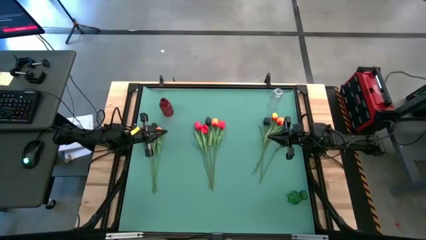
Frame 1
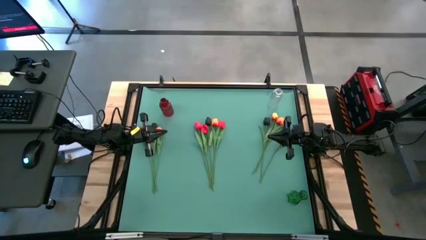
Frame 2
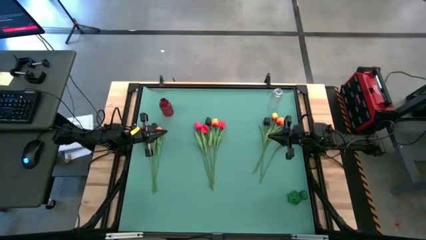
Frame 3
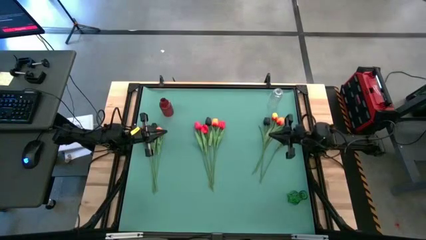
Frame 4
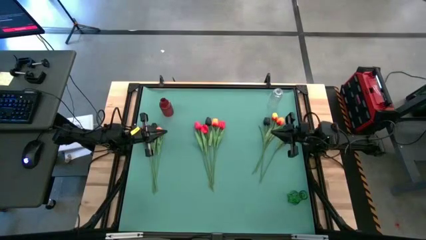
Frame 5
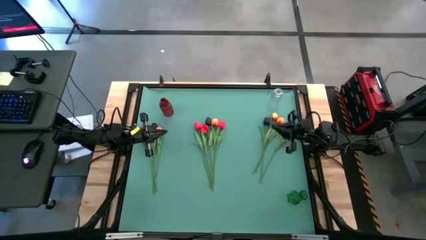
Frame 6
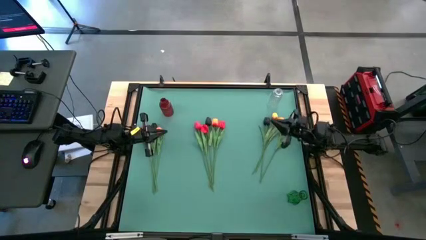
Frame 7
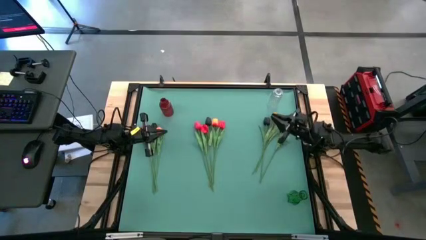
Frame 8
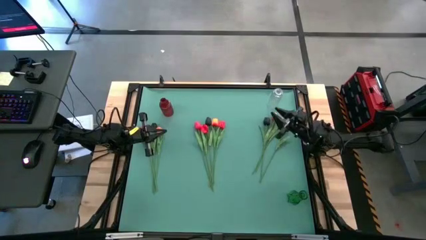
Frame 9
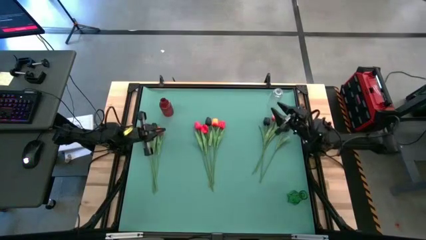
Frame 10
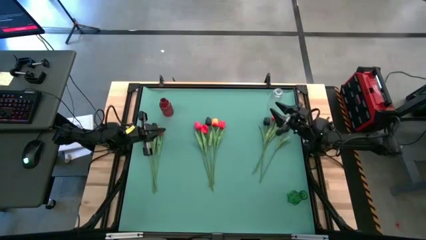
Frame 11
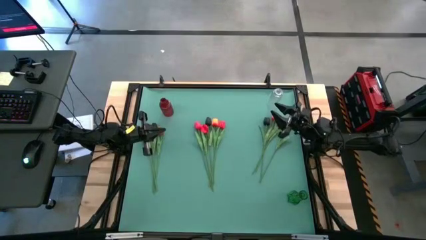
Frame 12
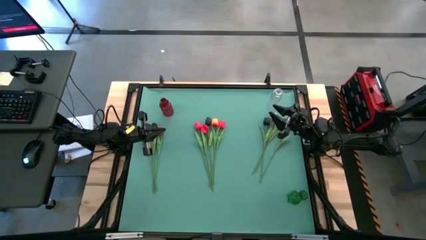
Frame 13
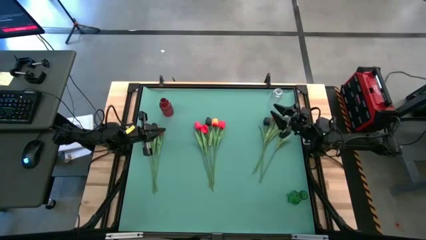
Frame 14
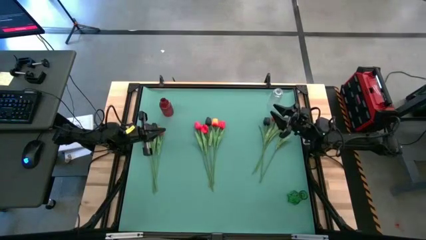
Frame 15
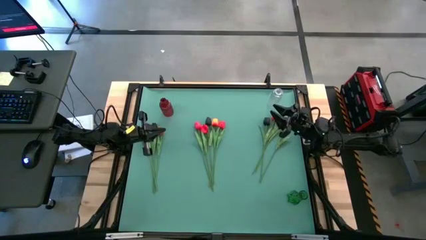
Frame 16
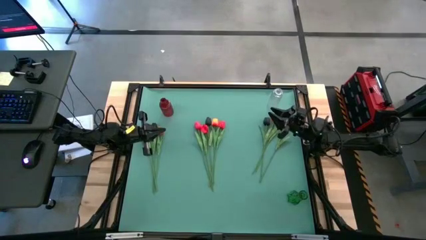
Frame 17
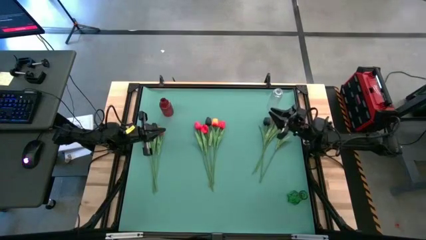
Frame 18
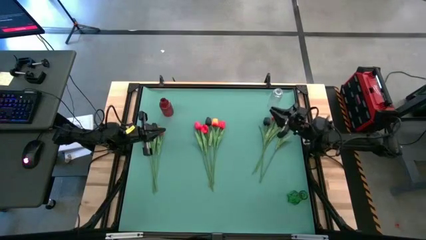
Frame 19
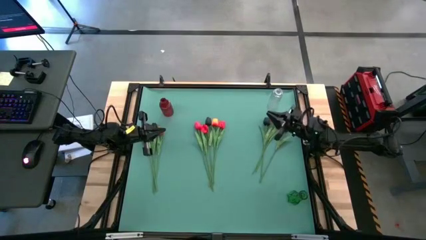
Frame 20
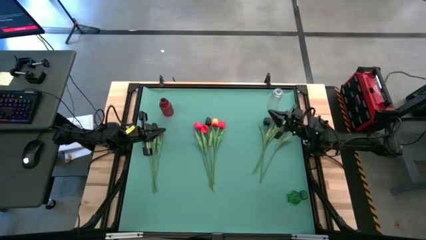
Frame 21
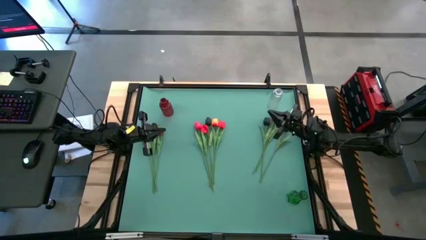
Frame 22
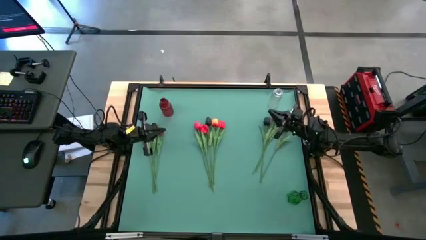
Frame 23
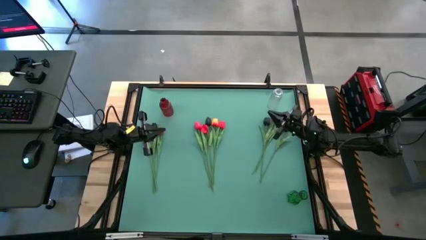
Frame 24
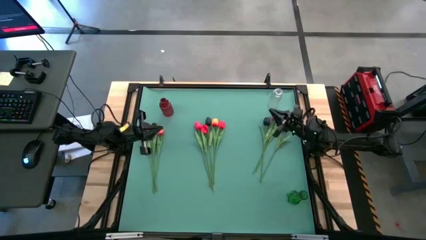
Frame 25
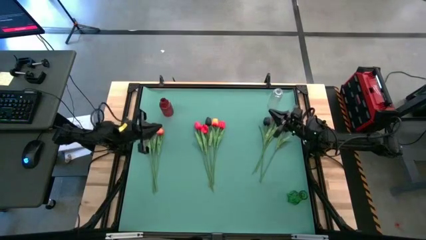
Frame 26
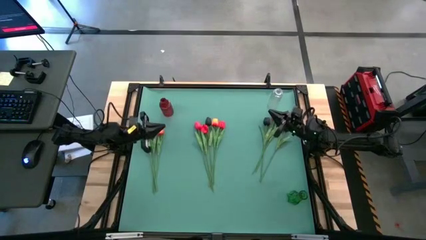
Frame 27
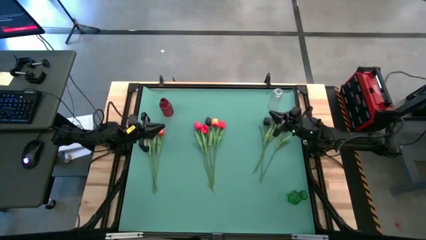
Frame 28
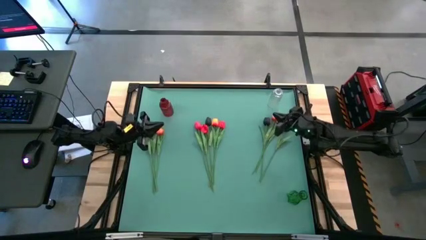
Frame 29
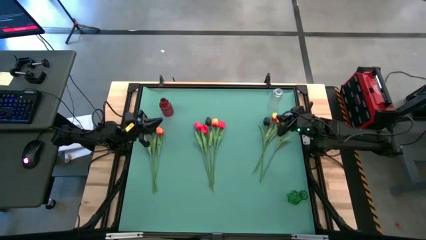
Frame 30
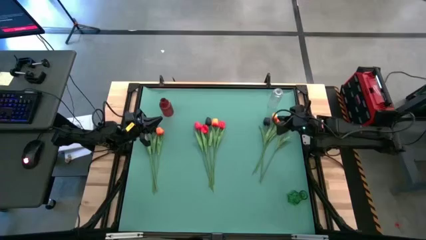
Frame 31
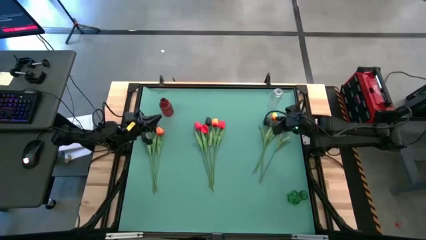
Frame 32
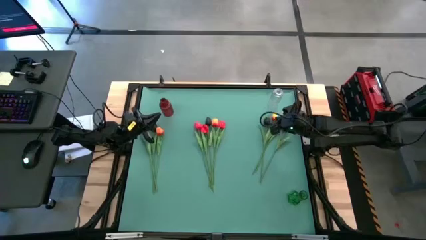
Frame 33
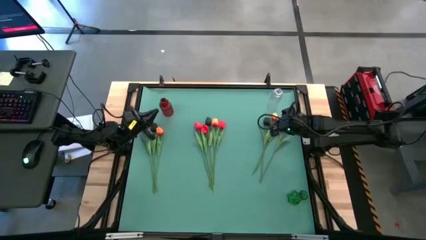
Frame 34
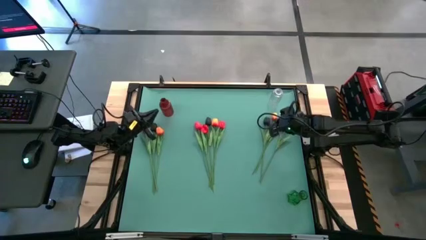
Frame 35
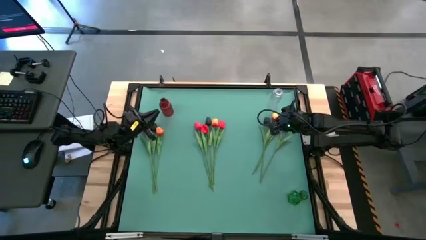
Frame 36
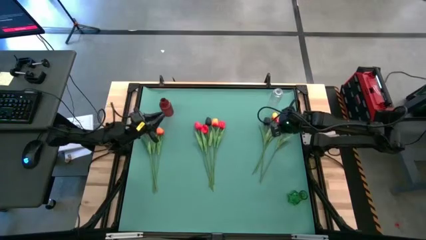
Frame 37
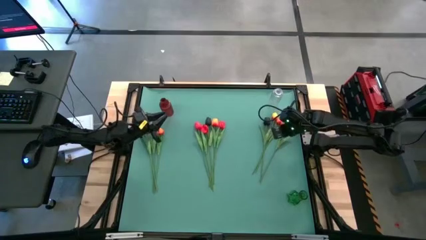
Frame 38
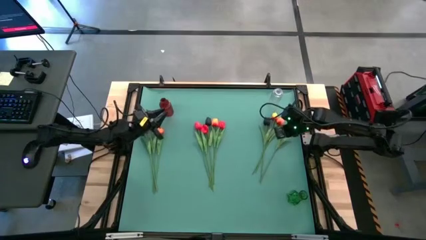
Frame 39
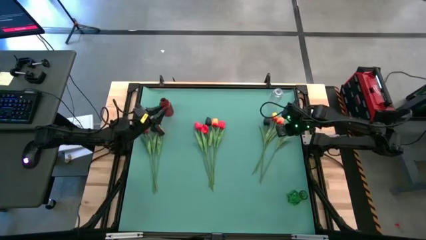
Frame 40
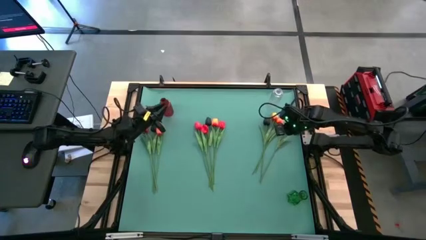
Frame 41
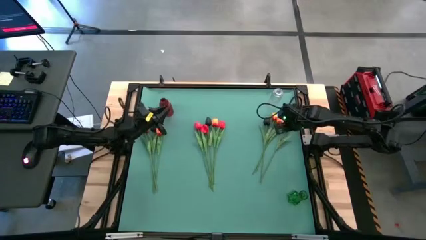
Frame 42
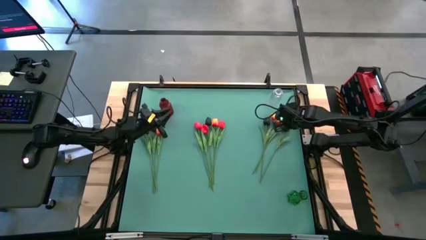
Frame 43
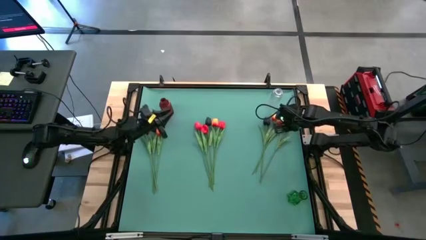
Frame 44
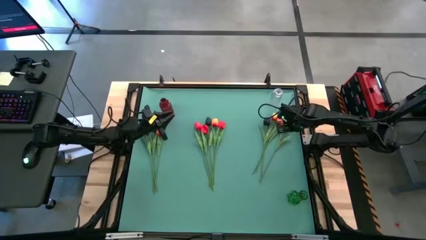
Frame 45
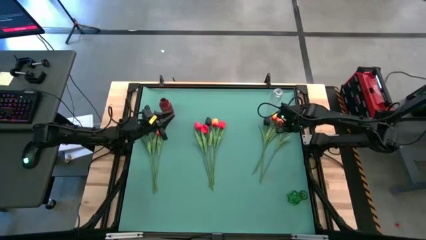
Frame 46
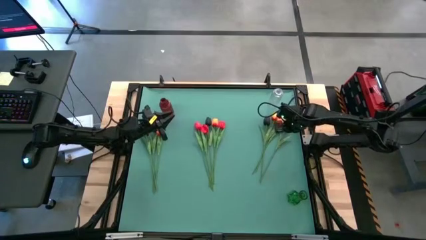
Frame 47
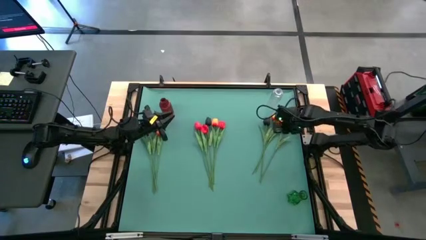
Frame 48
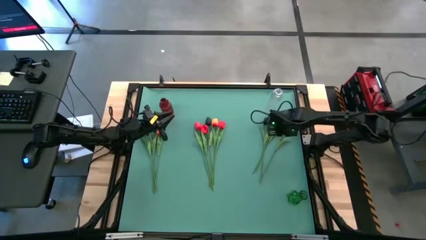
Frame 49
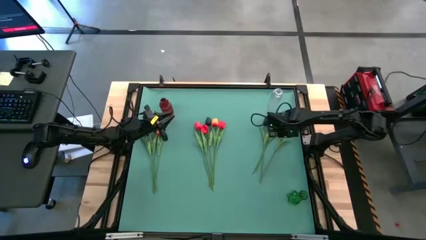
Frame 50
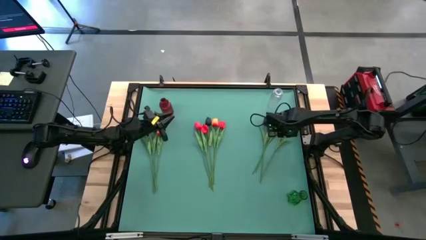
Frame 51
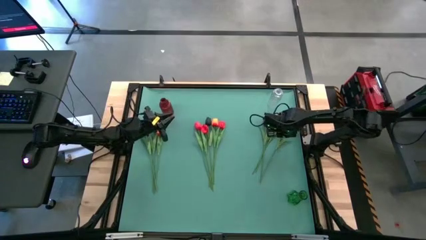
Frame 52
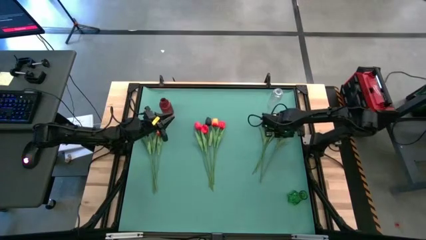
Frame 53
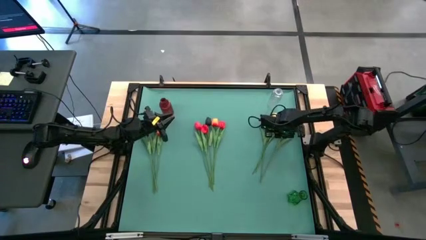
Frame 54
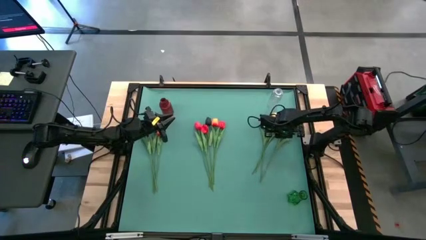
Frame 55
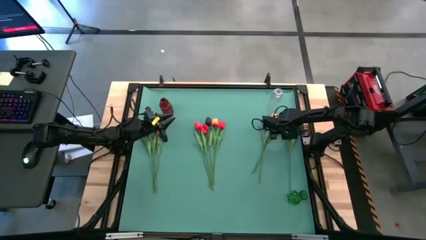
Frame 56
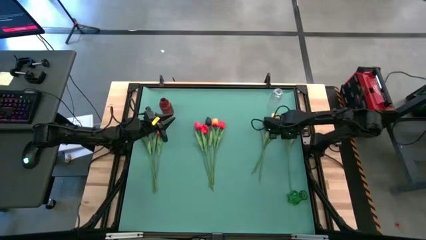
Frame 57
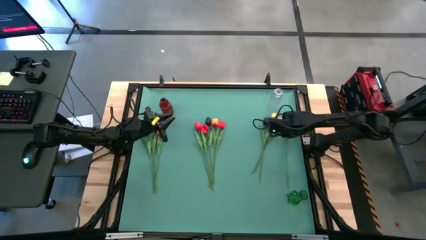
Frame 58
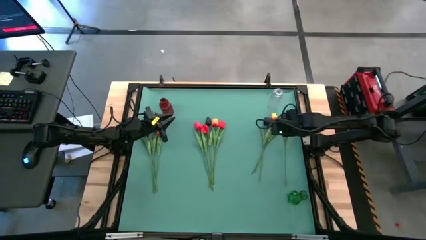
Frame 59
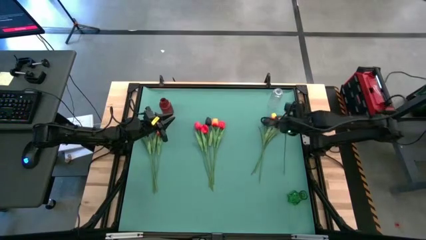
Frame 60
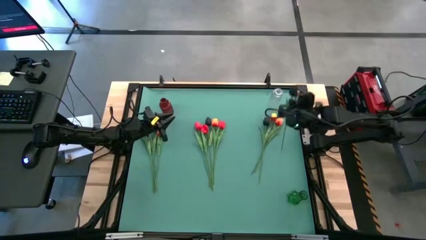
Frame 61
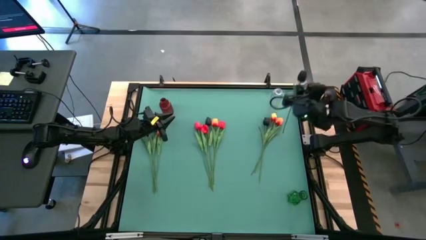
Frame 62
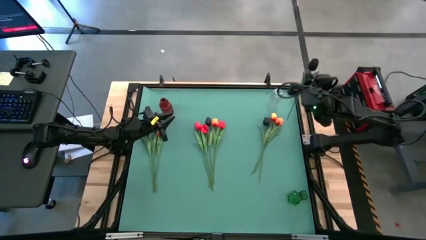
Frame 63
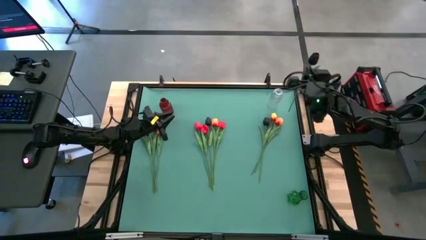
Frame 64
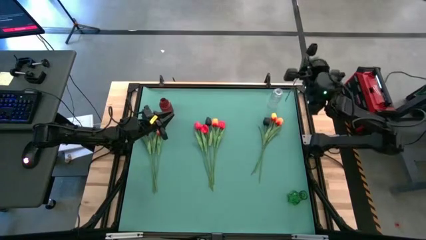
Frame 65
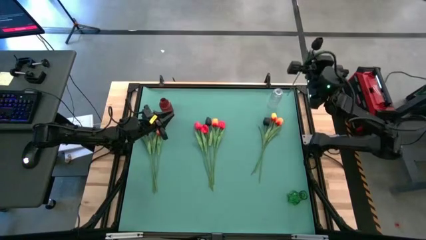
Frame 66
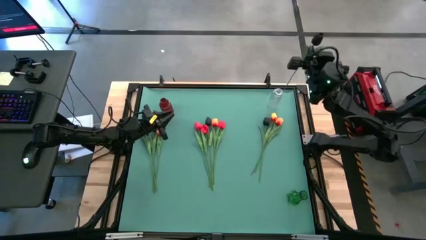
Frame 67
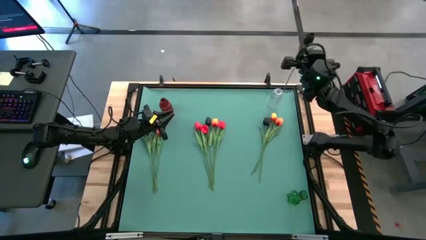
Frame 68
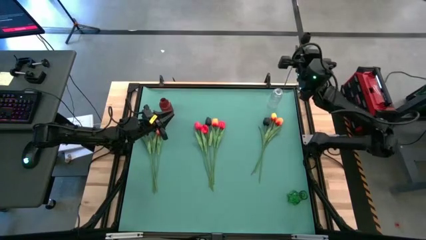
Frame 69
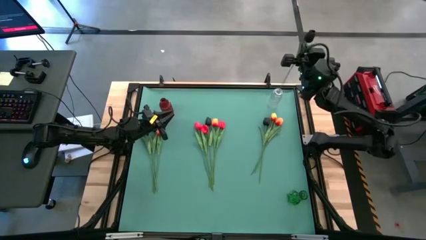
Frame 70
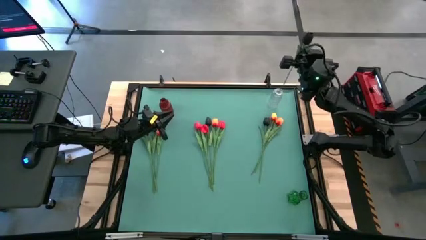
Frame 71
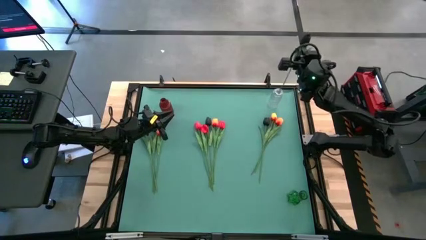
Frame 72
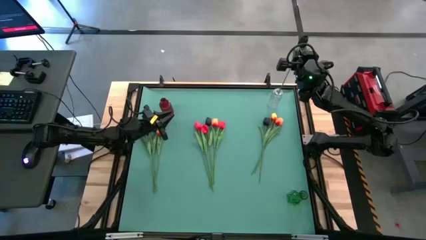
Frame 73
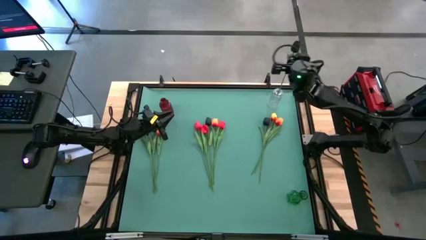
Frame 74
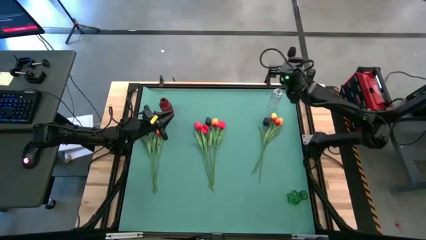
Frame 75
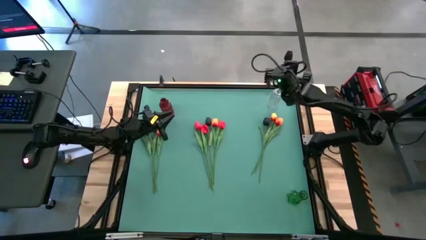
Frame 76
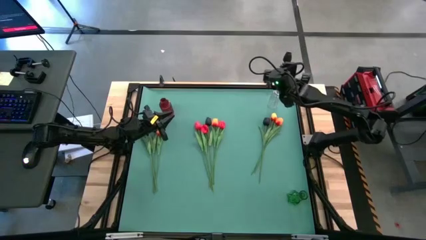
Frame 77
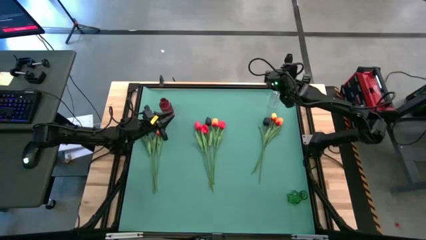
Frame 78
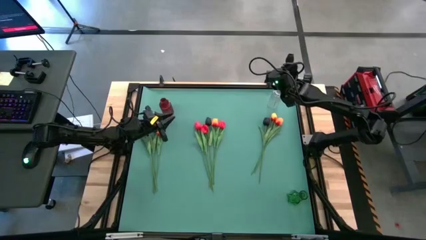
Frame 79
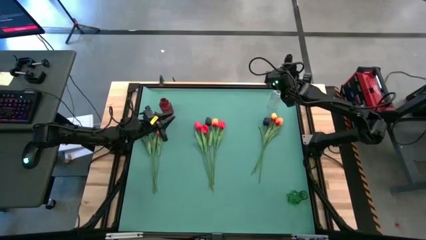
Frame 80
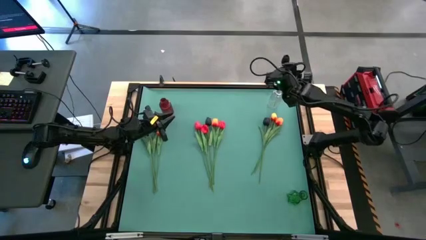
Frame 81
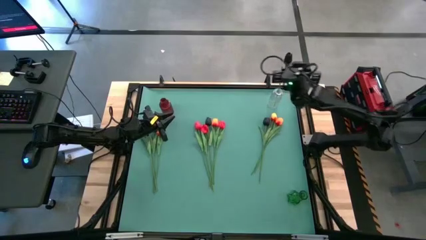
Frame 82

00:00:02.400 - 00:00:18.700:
Task: Sort flowers into vase by color
Put the black tulip into the transparent vase
